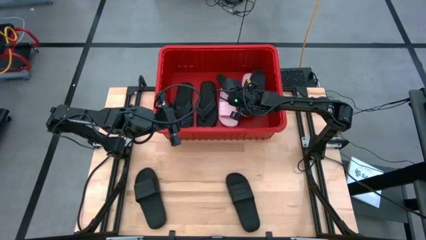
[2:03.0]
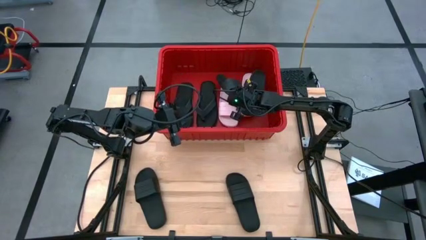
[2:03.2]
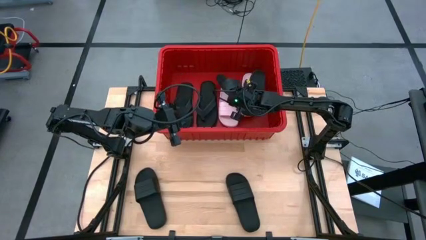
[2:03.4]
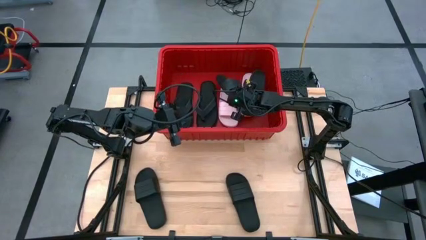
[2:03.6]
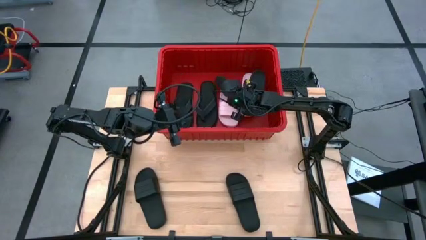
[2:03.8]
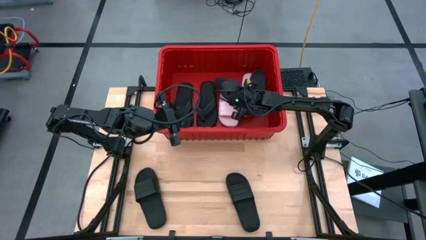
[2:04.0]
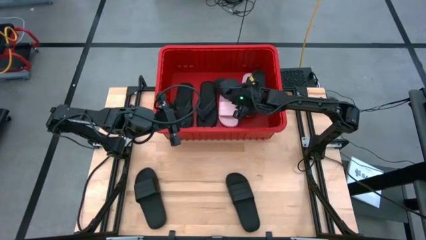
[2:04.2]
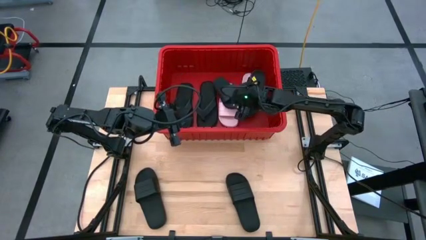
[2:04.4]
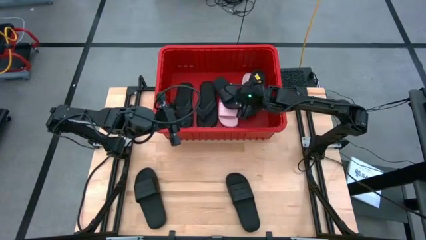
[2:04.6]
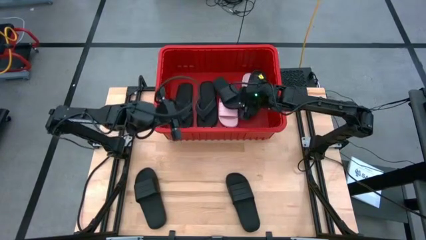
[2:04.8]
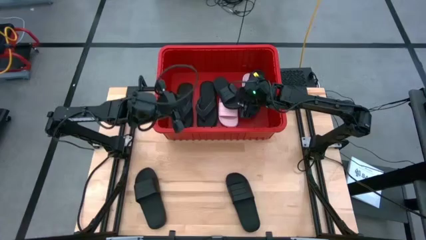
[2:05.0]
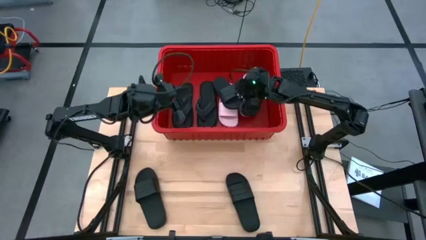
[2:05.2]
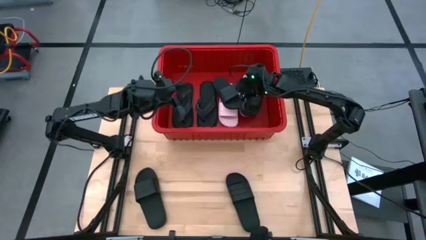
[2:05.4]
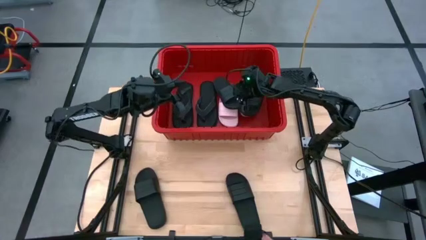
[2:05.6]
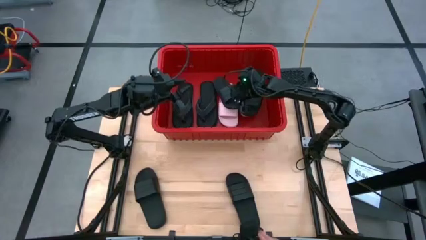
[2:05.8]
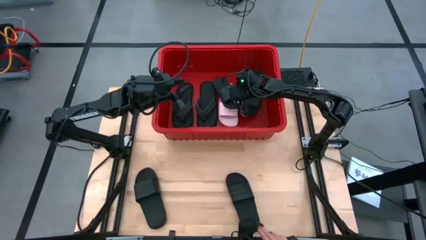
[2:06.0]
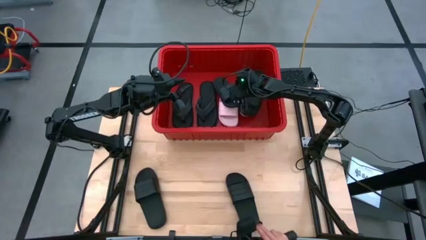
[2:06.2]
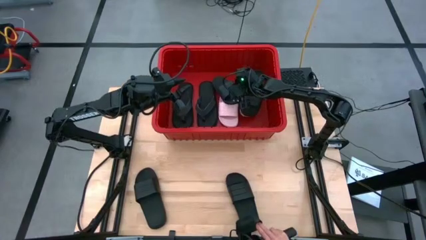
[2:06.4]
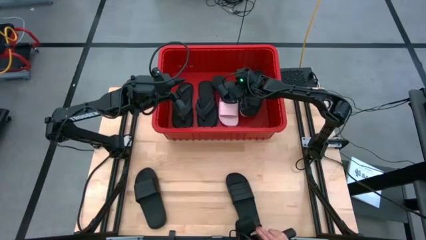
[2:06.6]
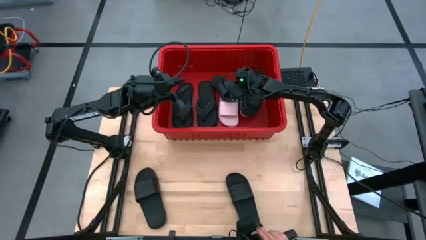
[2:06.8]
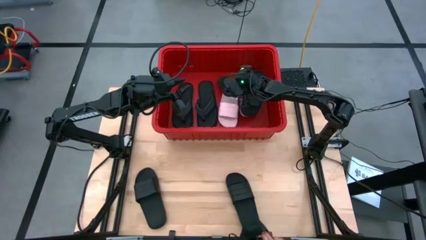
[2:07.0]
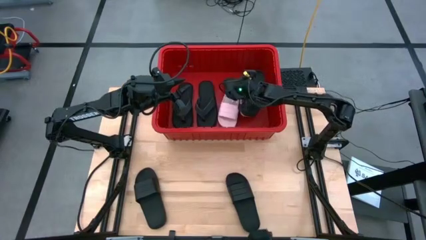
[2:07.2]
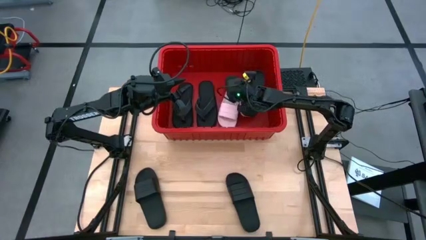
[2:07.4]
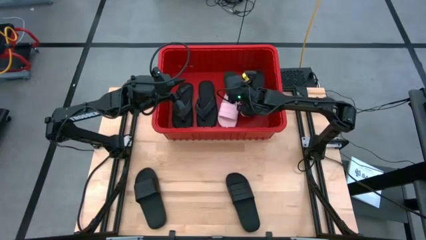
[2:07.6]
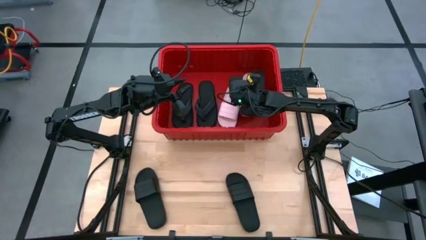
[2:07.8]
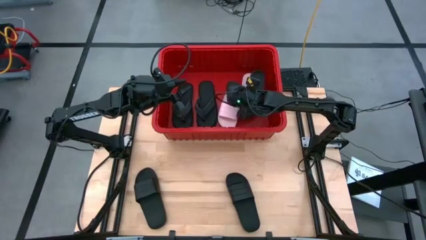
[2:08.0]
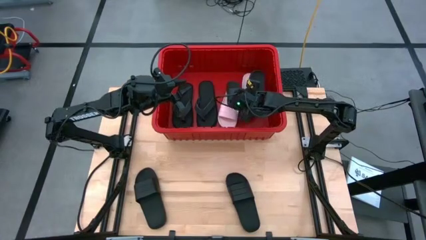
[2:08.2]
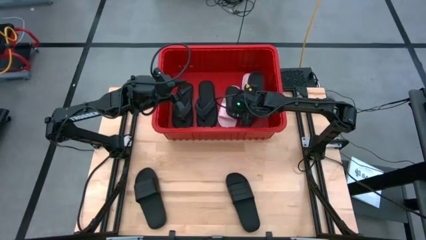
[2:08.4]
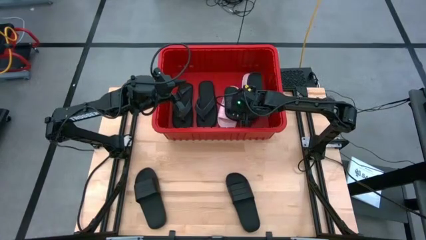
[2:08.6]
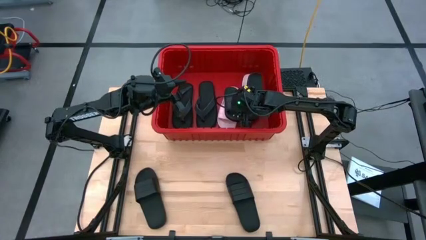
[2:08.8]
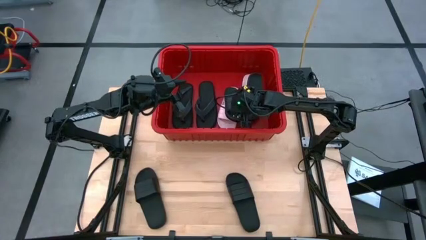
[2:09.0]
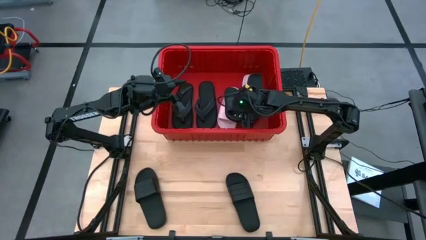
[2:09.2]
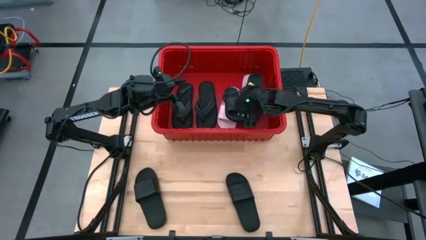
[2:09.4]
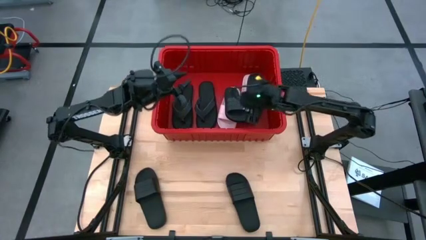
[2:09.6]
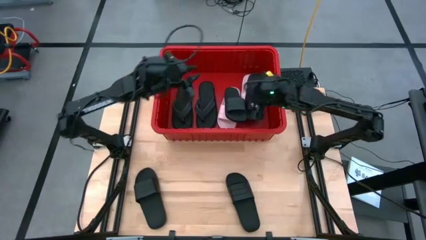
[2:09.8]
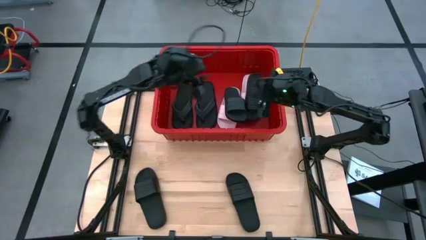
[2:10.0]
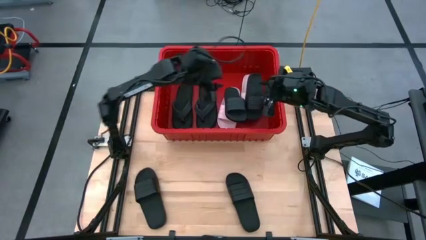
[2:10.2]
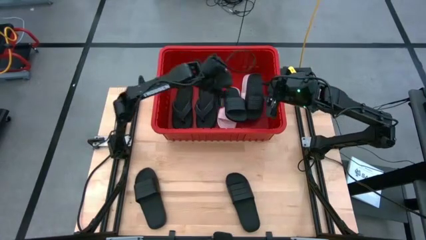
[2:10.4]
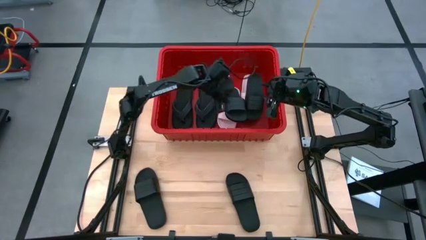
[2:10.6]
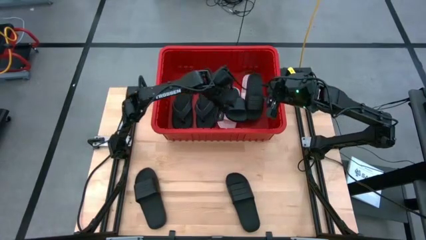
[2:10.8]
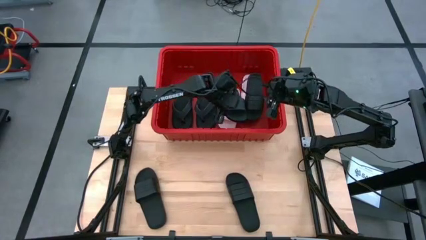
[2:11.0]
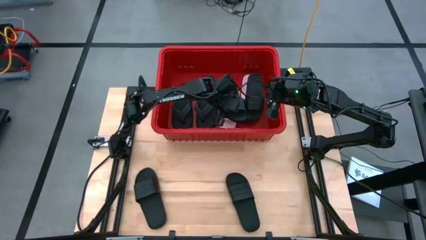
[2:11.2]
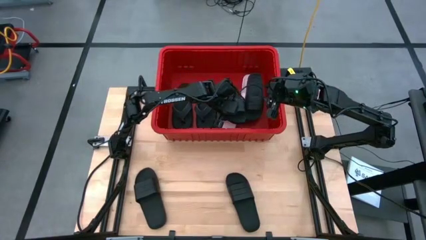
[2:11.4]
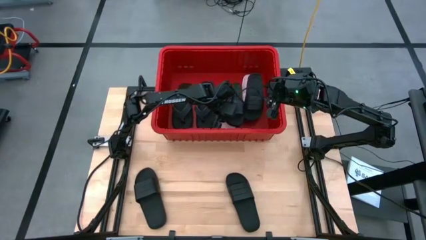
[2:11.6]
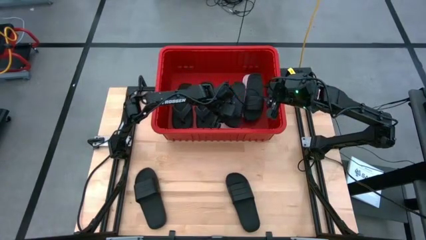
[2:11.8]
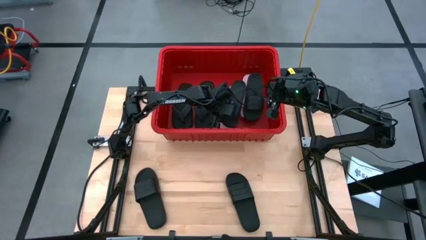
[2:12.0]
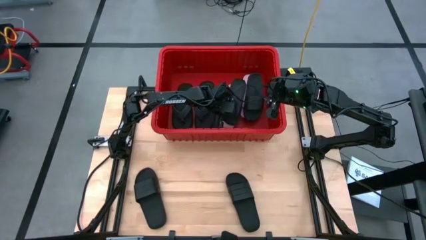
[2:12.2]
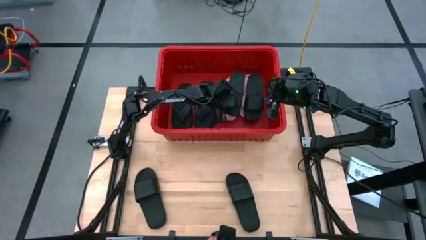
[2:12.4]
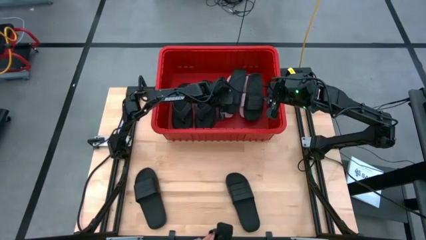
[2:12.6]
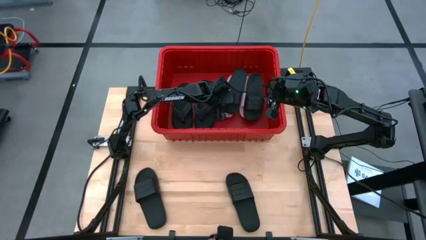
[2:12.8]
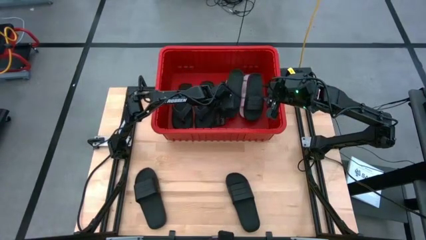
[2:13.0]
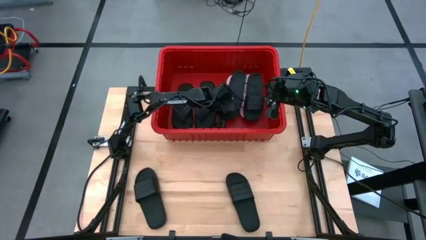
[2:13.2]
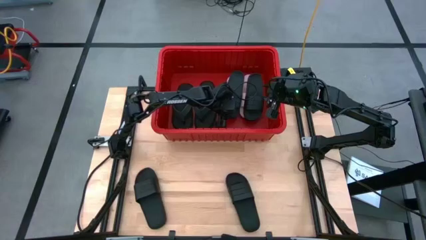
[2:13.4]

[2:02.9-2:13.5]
Task: Pick and place slides into bin
Put the black slide into the red bin

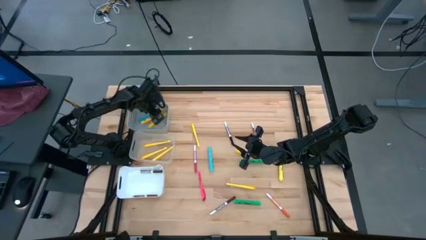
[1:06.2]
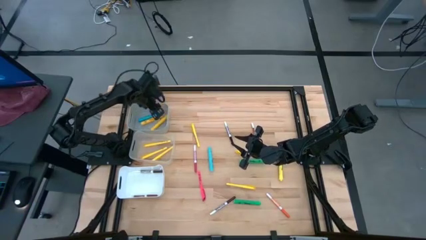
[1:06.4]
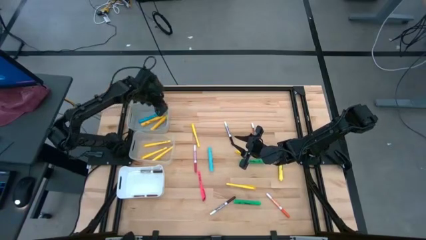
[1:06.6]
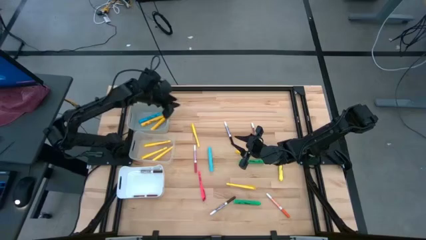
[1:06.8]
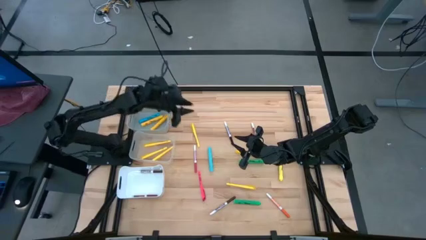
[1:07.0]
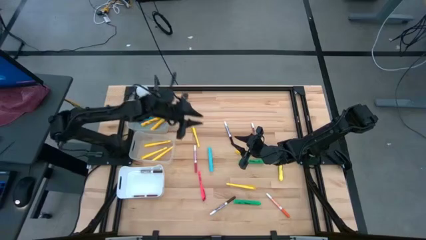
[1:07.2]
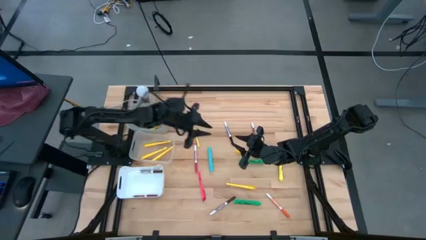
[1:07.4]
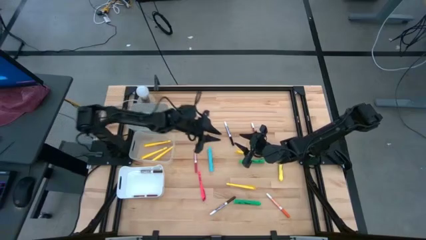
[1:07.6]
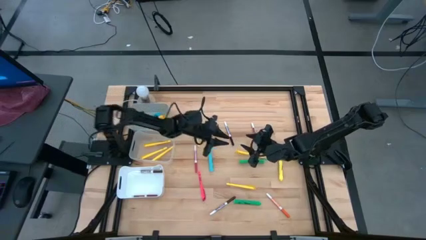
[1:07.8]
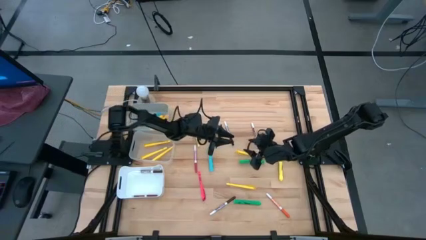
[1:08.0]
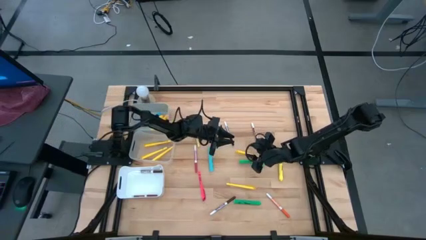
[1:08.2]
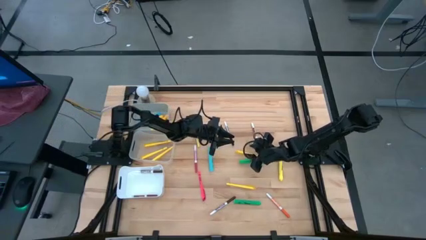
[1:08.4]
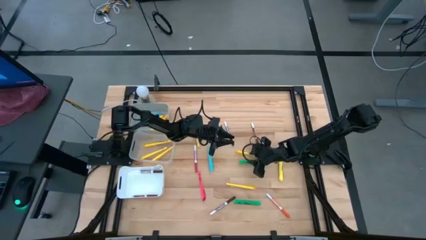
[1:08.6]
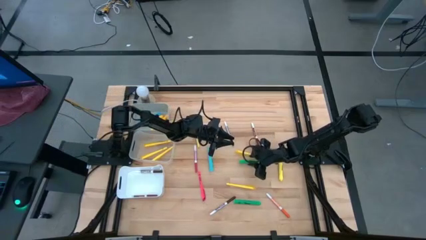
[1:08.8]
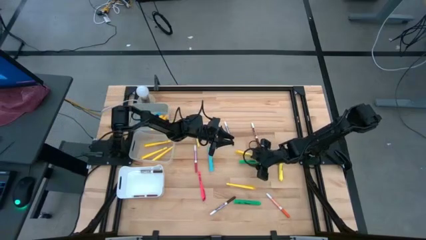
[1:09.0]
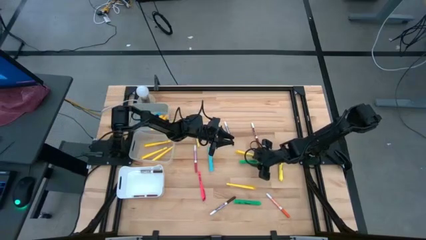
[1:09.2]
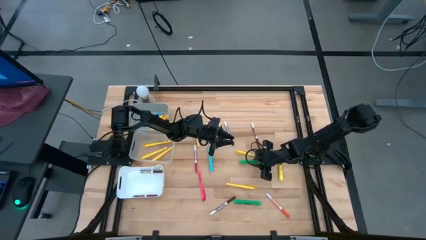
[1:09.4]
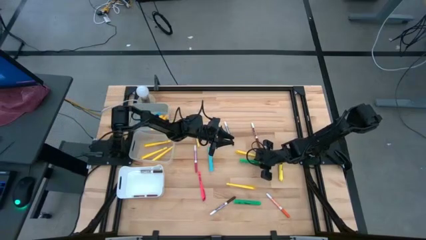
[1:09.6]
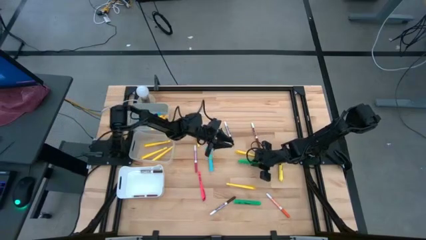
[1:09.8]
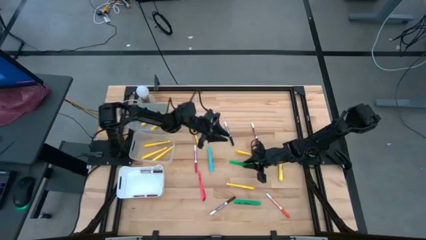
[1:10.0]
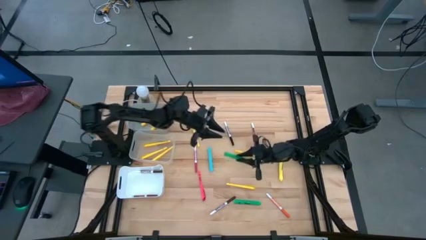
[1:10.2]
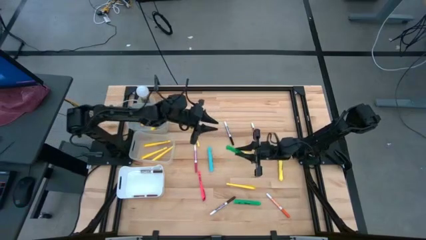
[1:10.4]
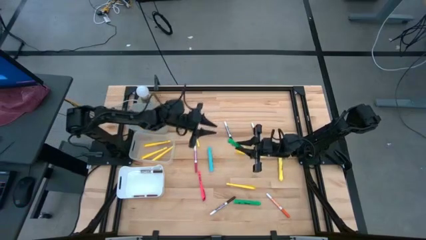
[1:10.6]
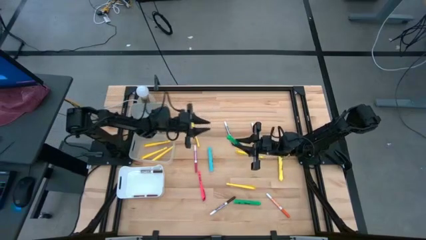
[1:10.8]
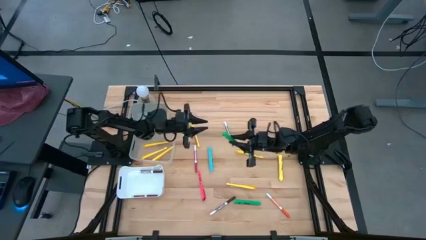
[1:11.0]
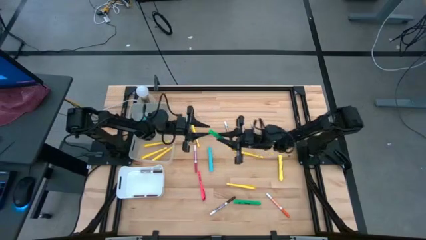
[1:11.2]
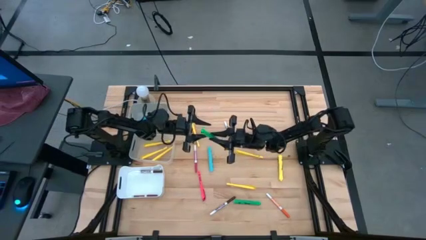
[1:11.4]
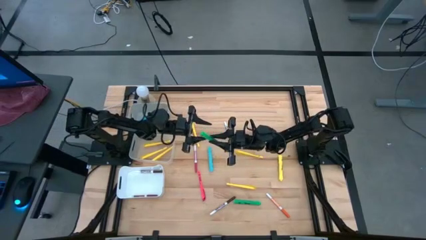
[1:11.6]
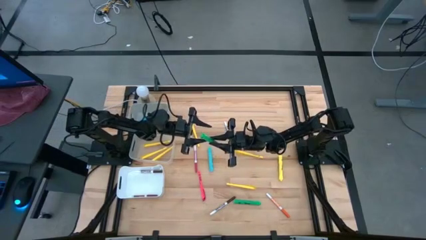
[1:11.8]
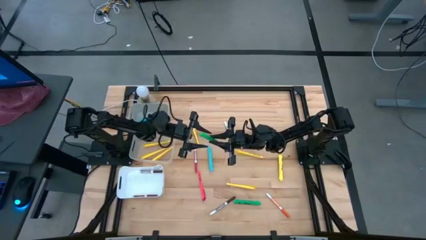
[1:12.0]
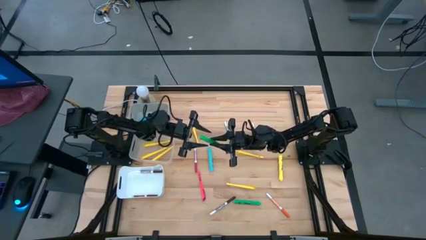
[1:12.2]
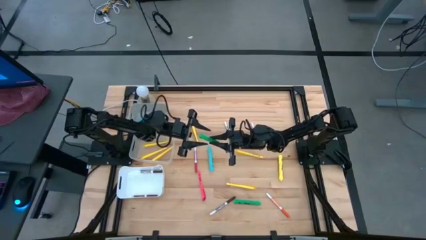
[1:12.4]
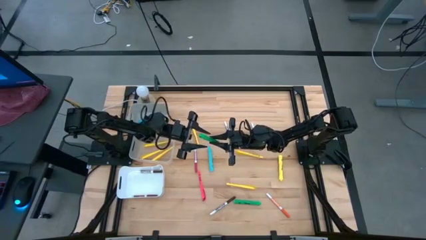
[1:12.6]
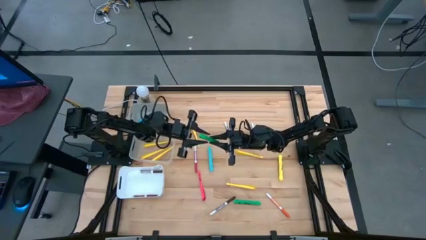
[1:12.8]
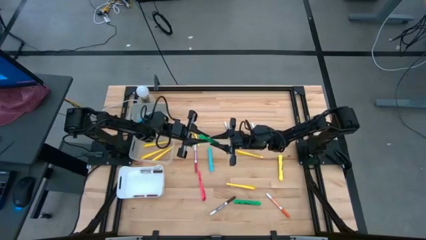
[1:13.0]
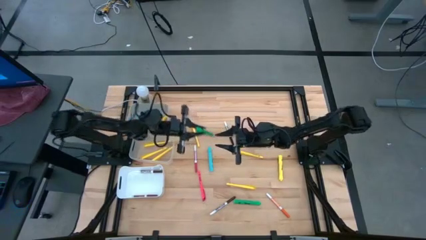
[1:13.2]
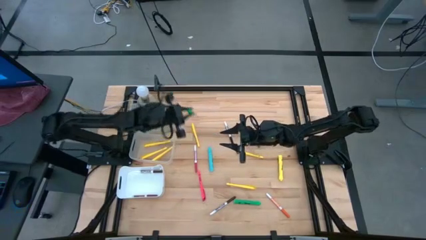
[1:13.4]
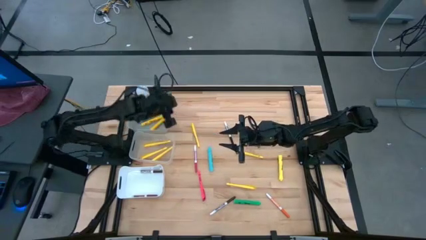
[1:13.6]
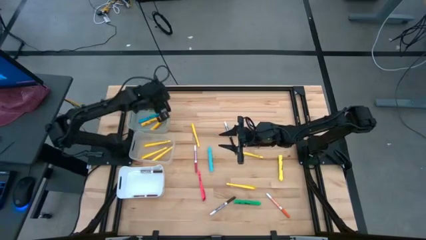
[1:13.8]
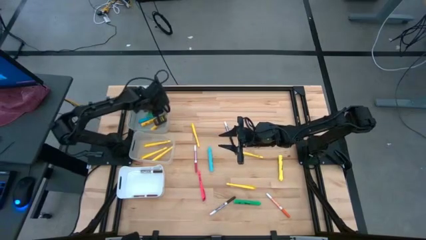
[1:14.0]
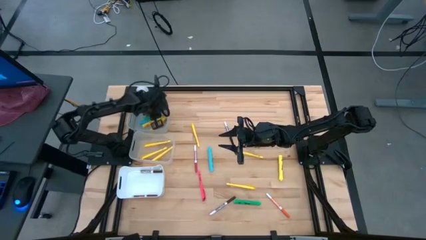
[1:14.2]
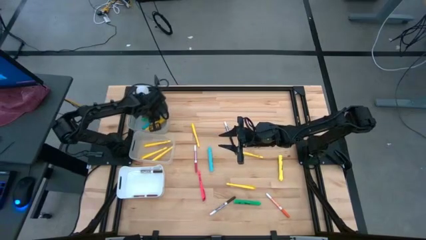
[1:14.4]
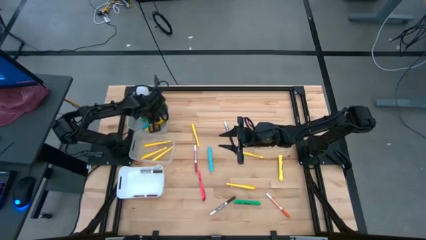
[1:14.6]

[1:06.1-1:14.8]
Task: Pick & Place Markers
Put the green highlighter into the gray bin
